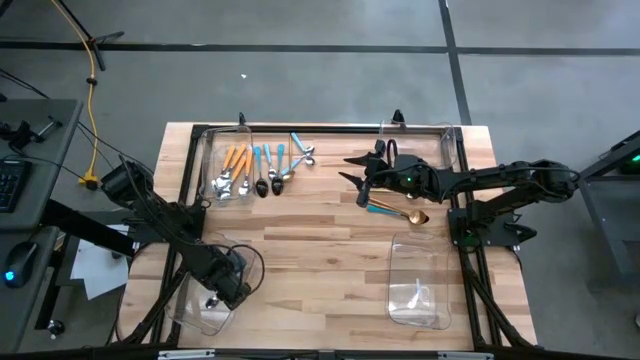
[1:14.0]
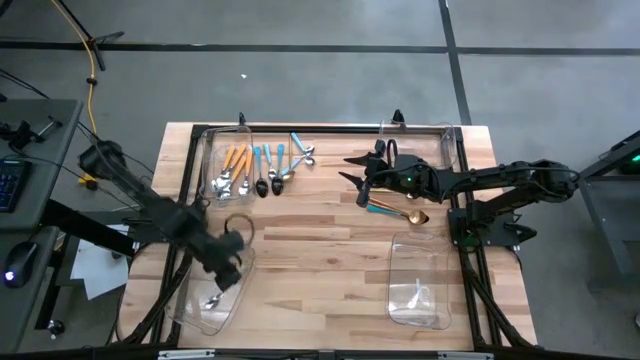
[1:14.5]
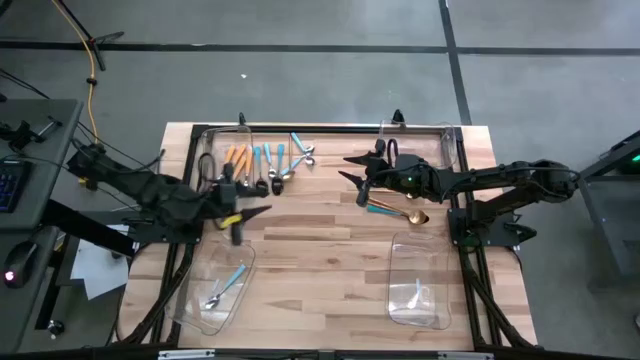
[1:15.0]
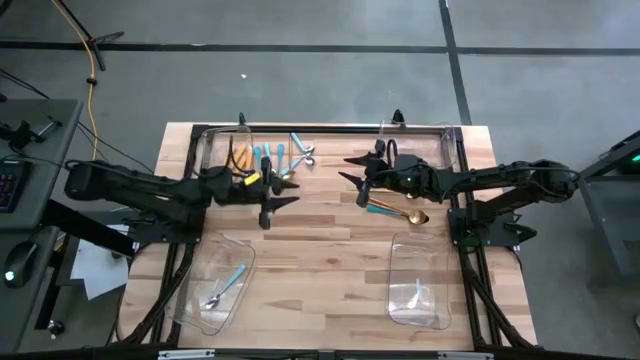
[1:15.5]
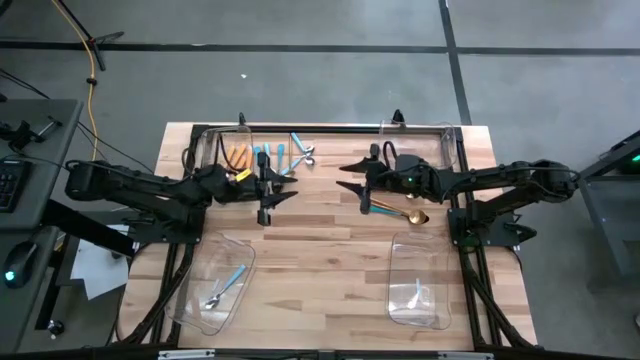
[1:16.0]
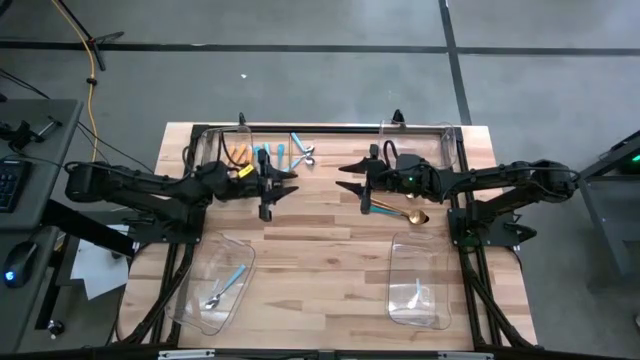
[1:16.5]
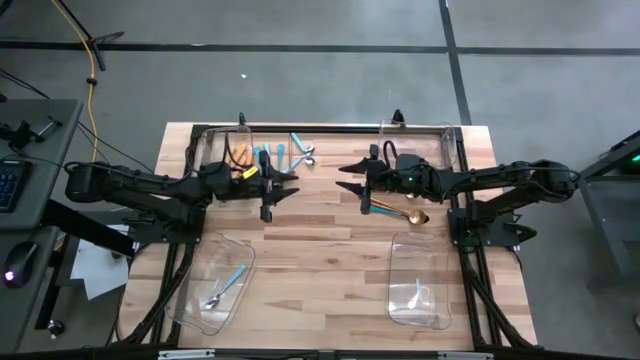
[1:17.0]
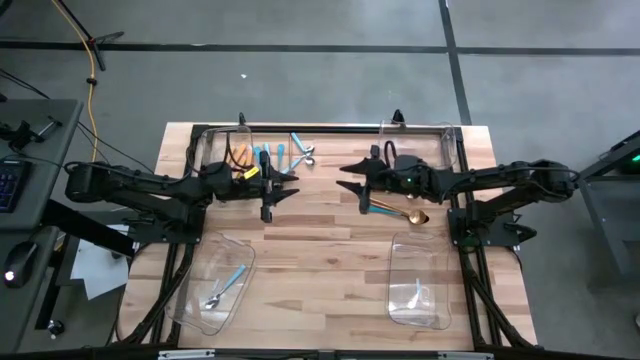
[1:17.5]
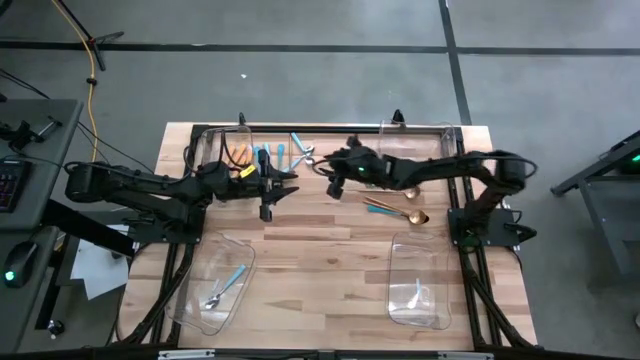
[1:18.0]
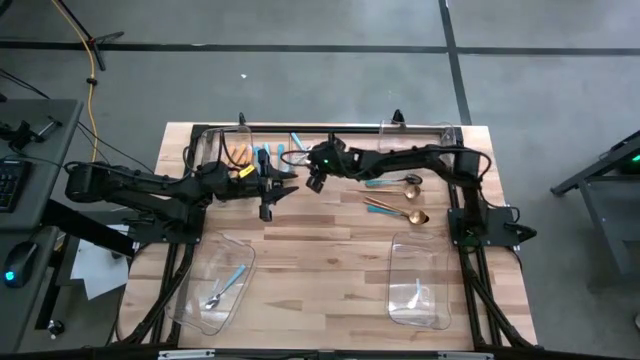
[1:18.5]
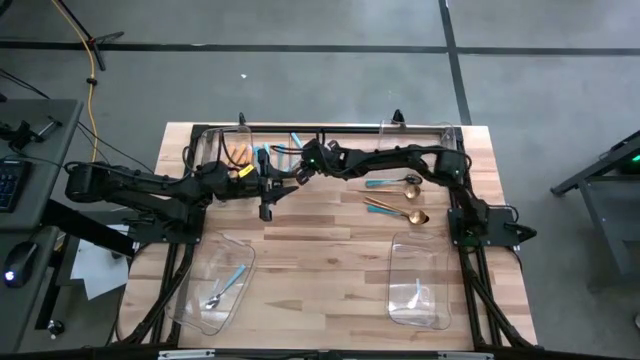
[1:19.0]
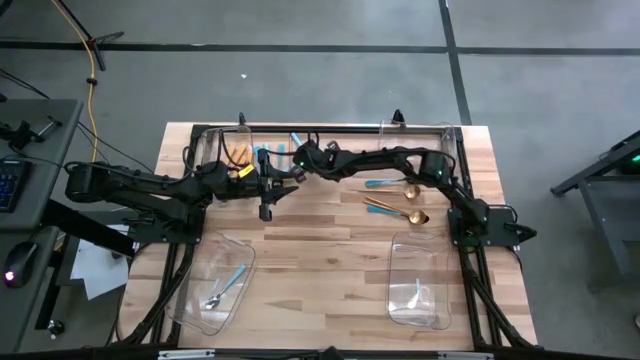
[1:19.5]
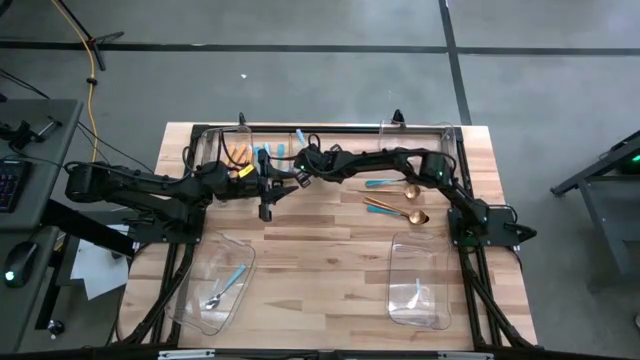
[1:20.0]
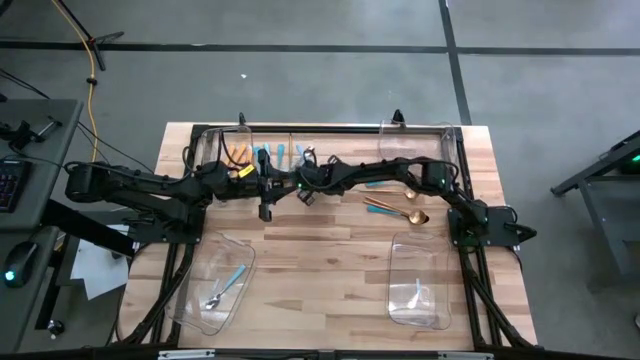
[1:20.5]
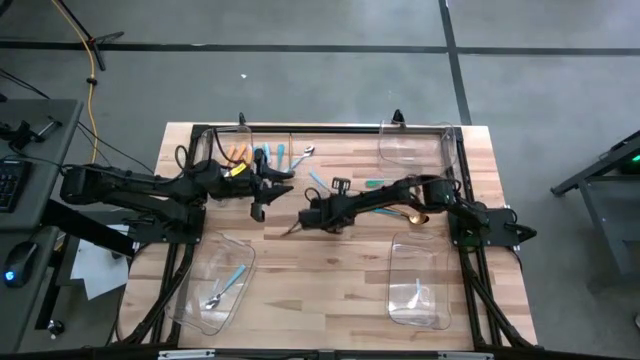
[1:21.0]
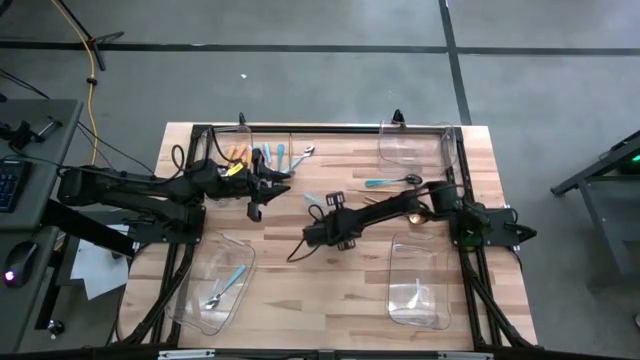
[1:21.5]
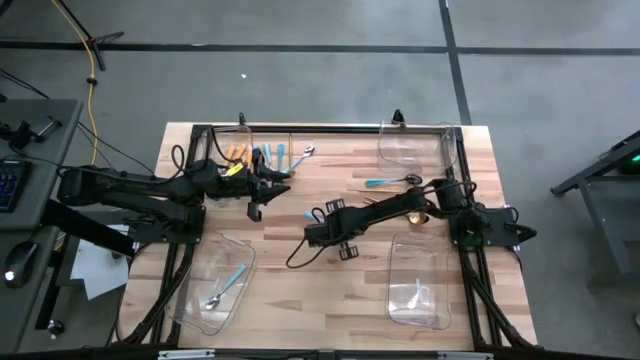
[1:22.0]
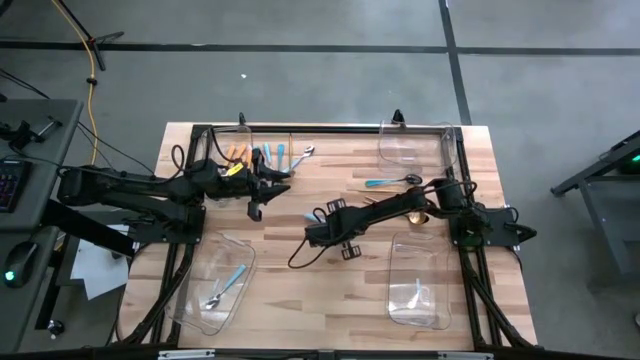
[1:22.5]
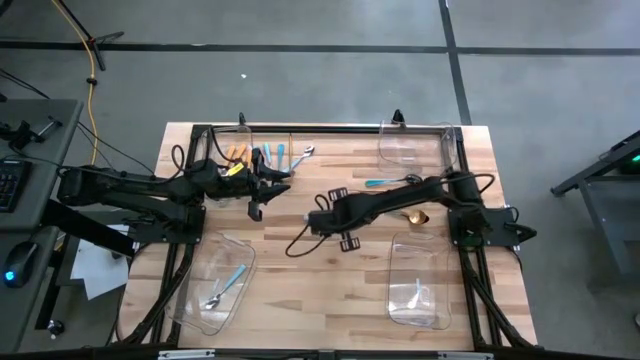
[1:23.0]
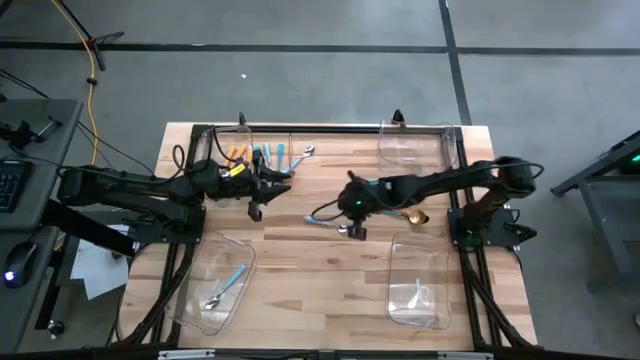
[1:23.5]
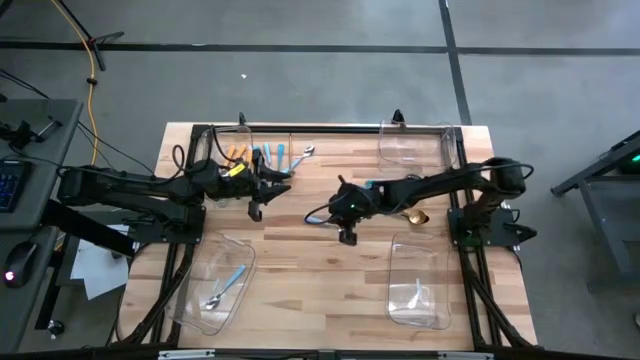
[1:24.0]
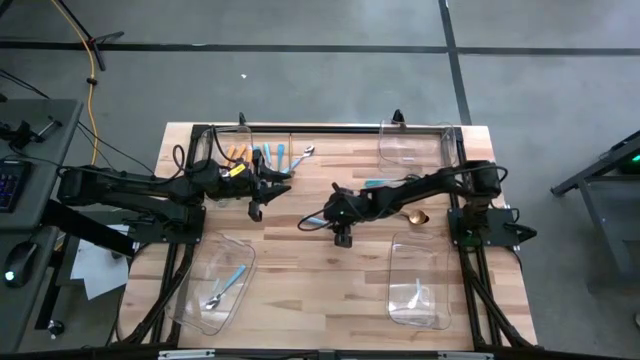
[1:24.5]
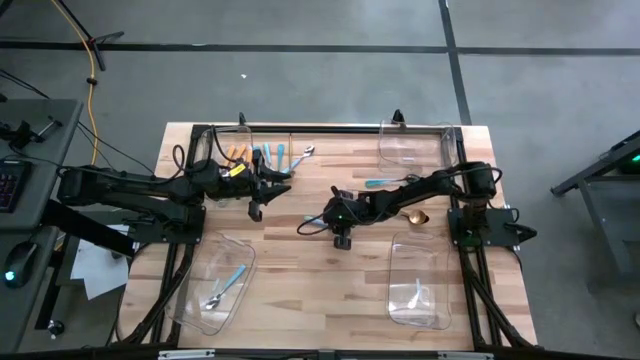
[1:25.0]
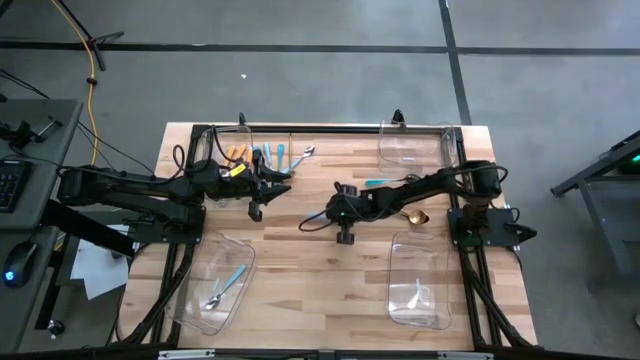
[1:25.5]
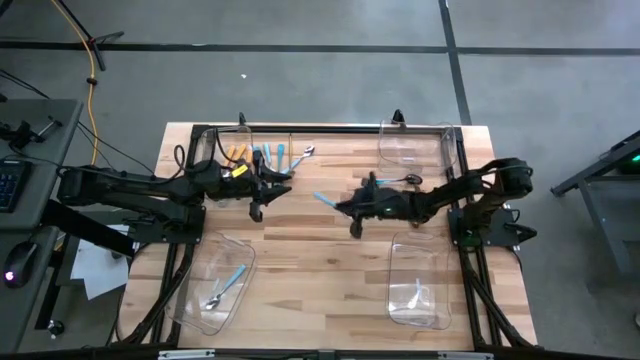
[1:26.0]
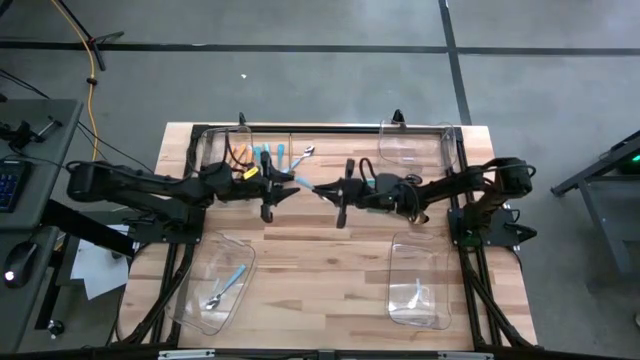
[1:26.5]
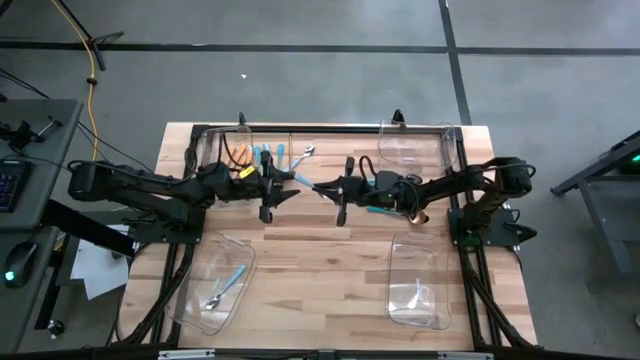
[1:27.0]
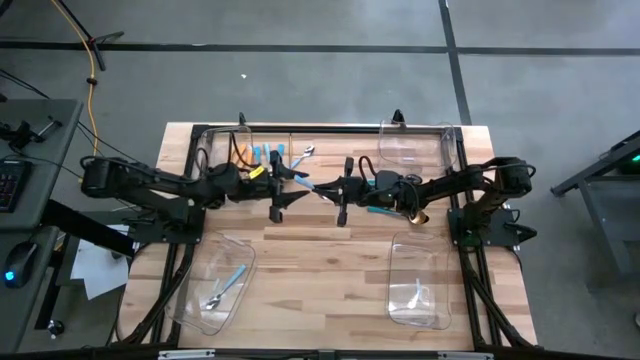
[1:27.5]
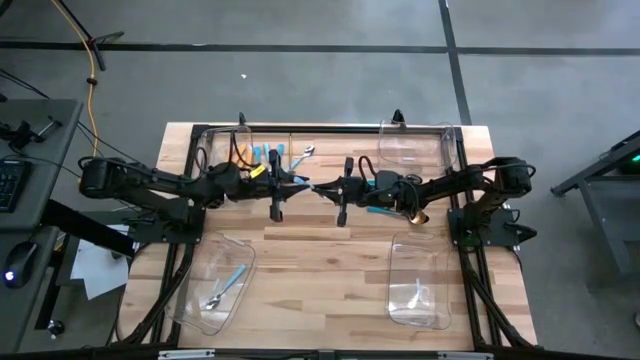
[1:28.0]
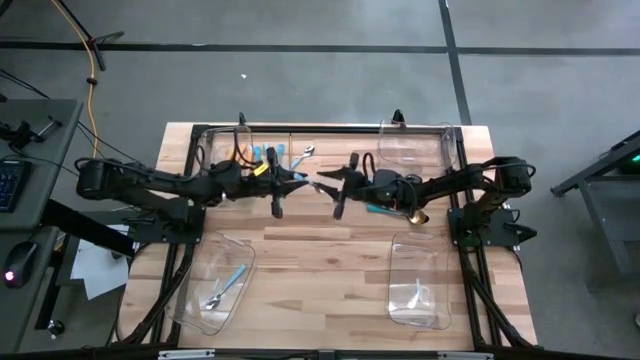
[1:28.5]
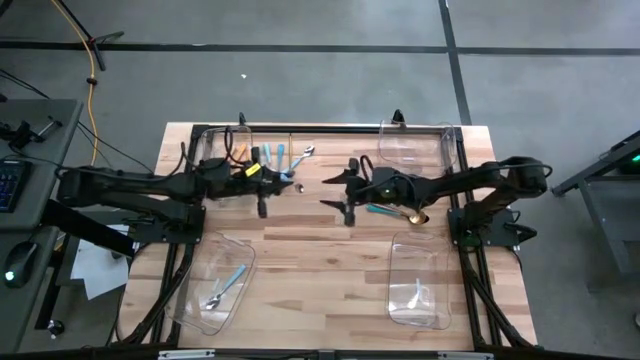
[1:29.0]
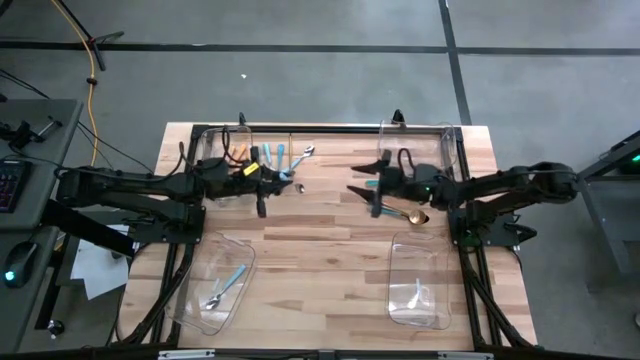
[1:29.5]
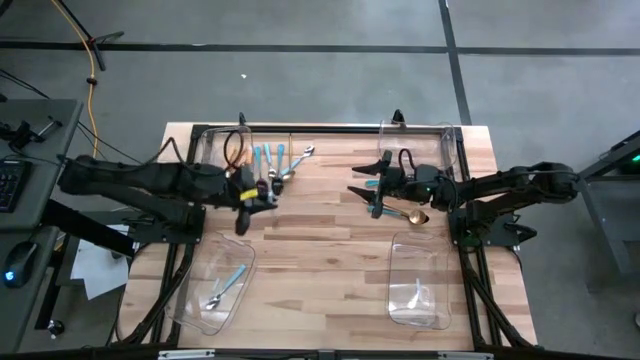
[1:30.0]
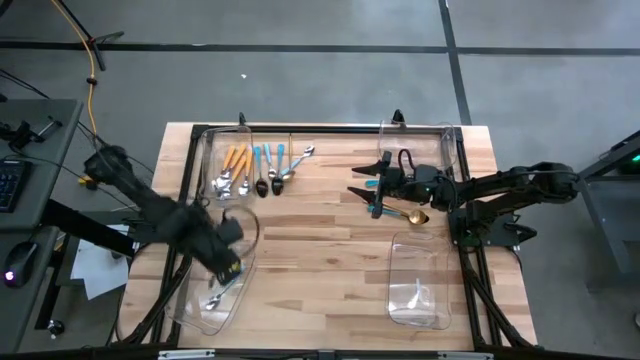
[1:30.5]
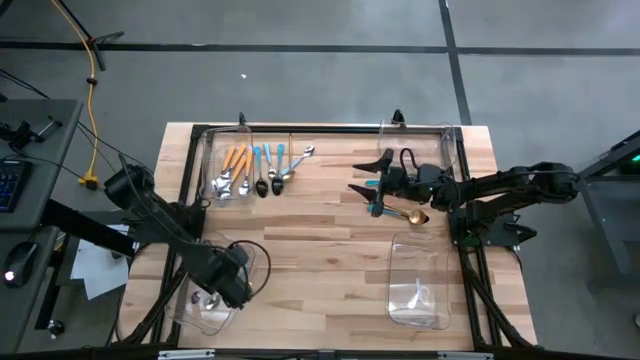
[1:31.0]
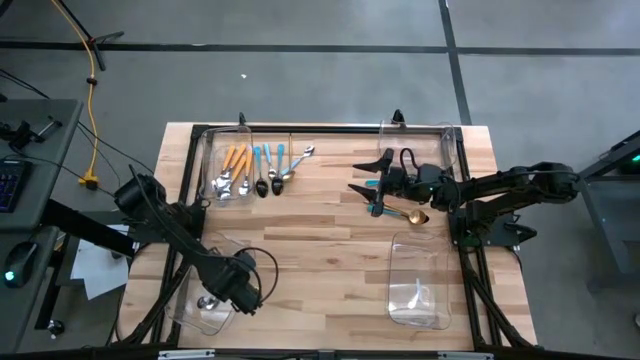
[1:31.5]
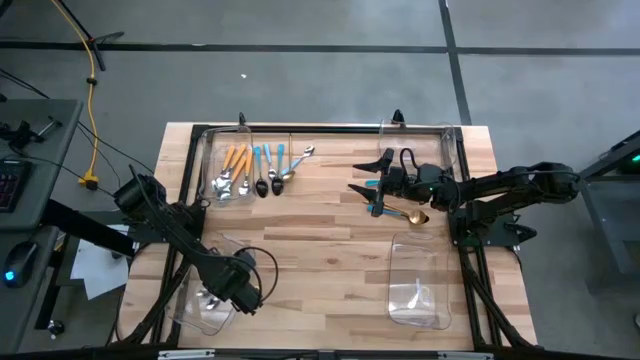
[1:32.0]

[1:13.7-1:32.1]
Task: Sort silverware by color (type)
Put the light blue spoon into the bottom left transparent bin

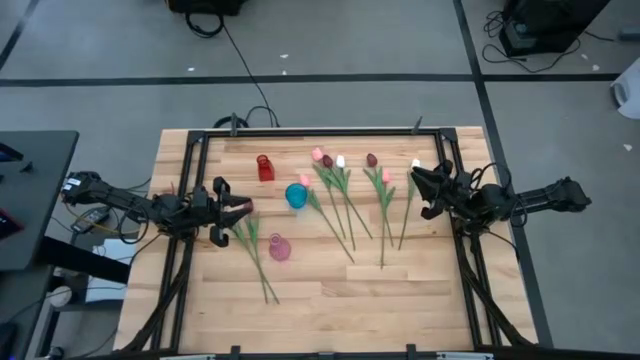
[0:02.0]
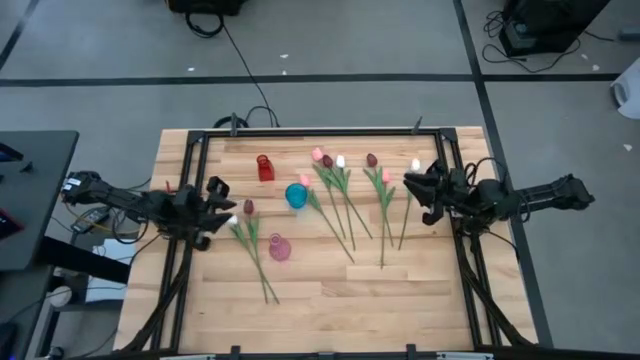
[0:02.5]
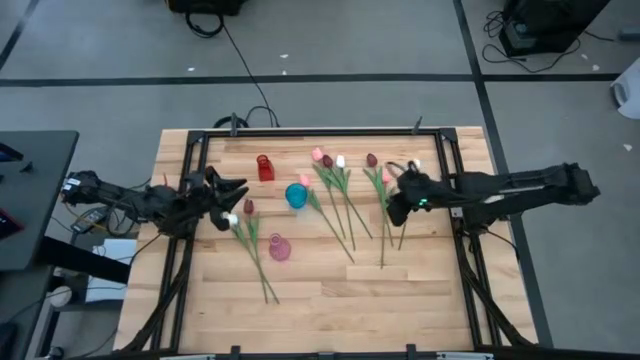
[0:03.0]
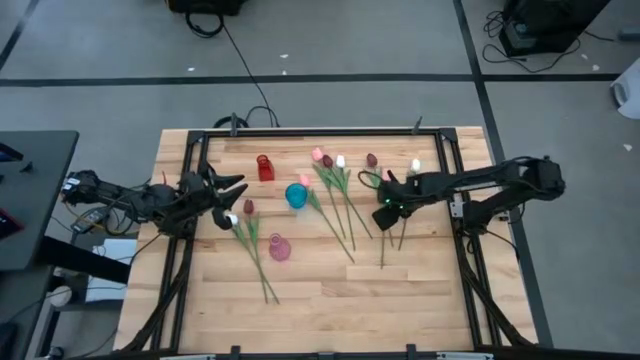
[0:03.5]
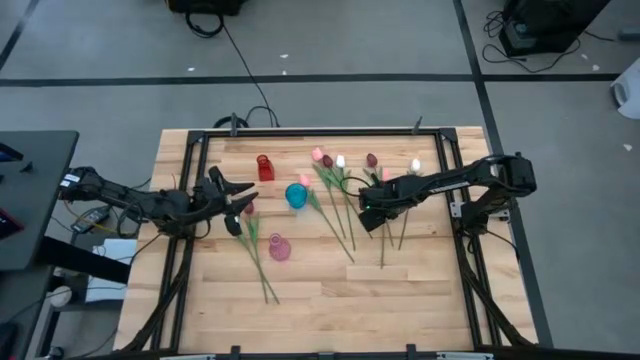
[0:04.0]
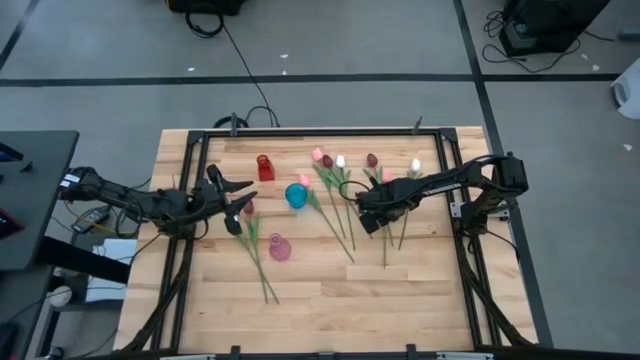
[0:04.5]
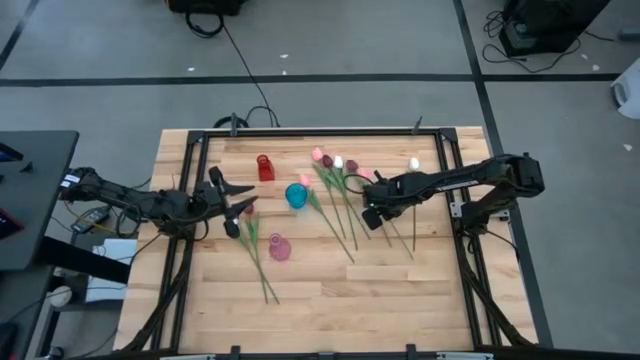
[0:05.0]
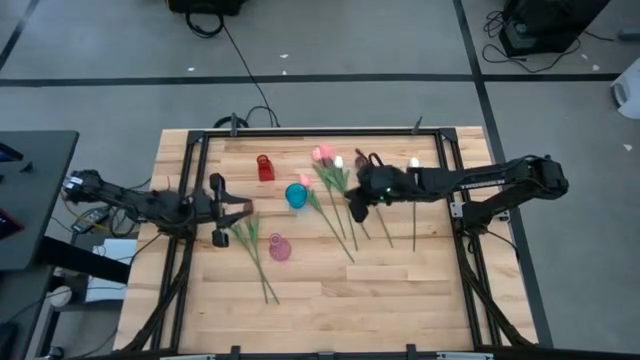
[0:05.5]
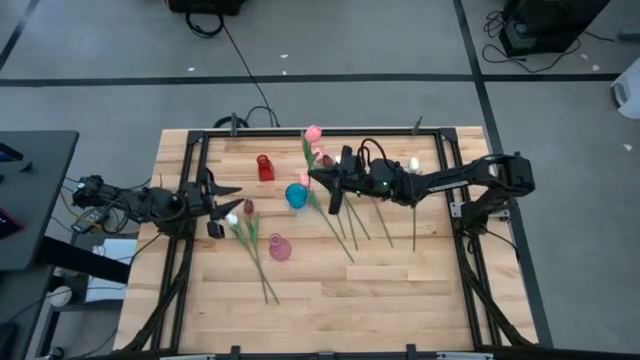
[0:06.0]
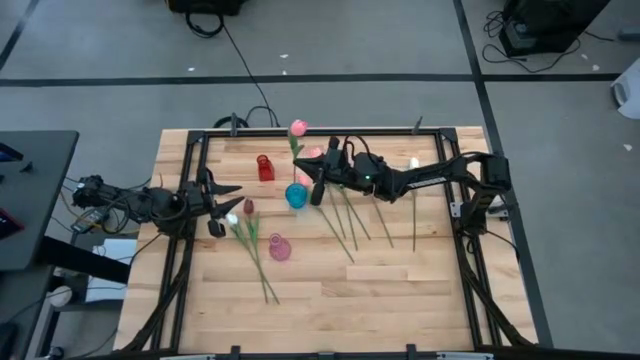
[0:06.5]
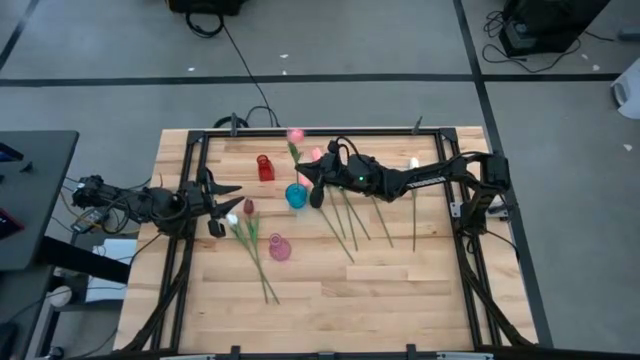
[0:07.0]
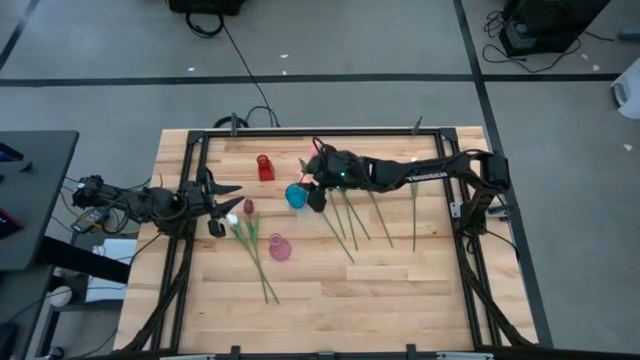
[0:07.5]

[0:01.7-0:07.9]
Task: Sort flowers into vase by color
Put the right pink tulip into the blue vase
